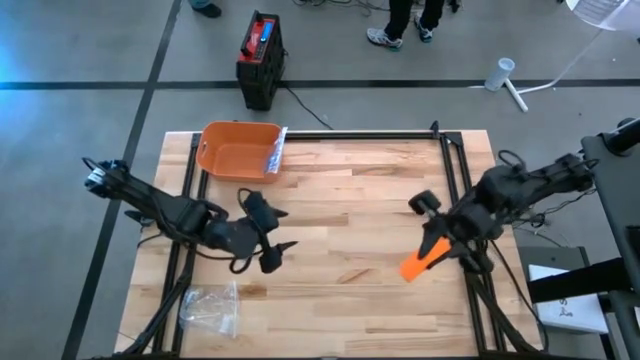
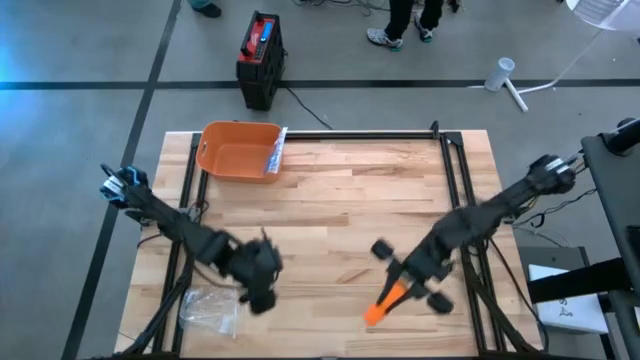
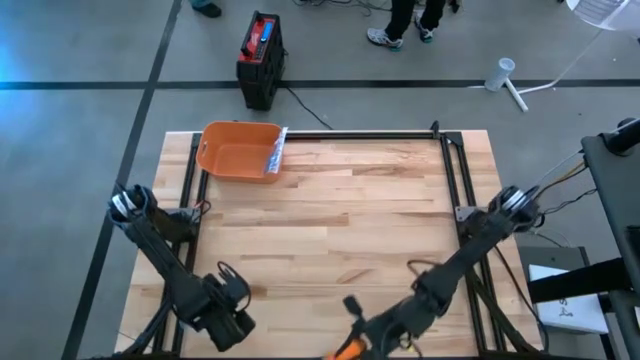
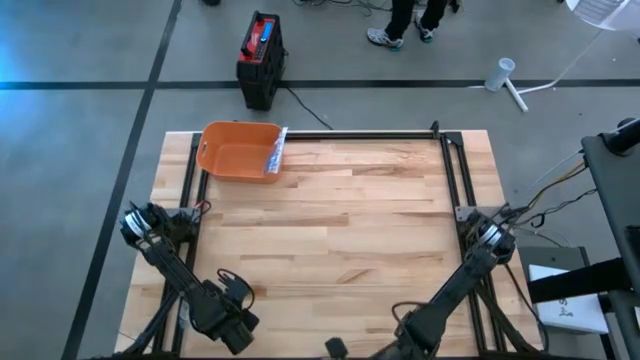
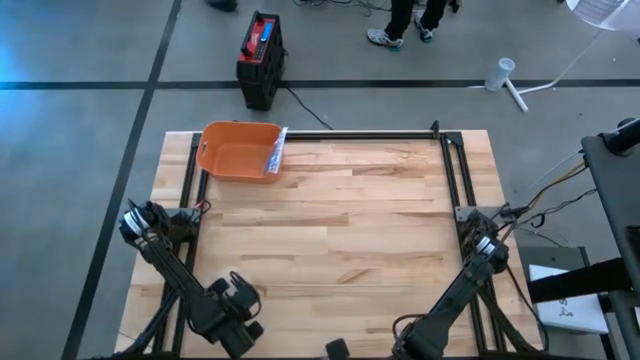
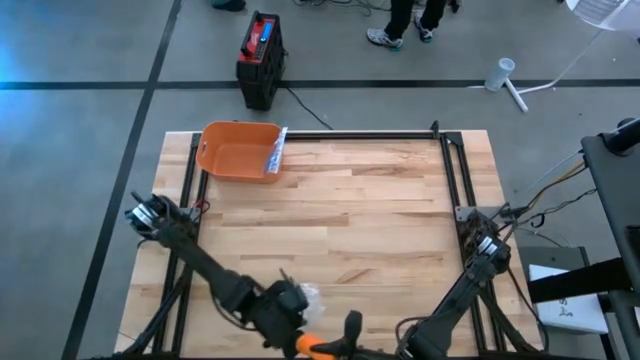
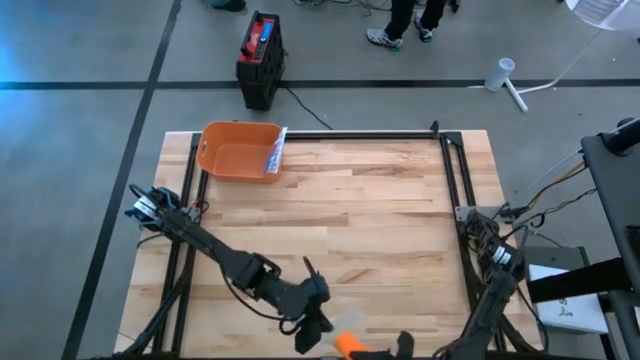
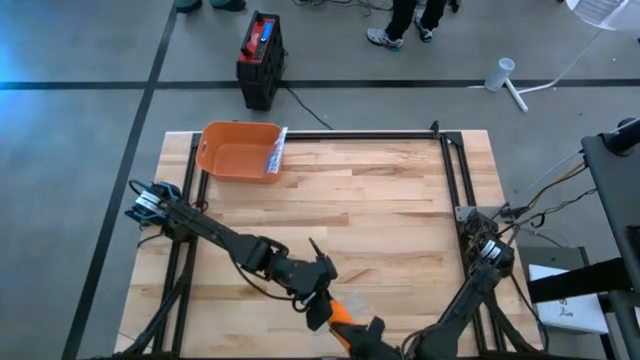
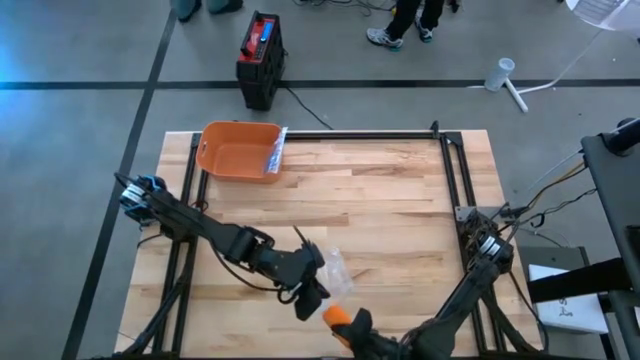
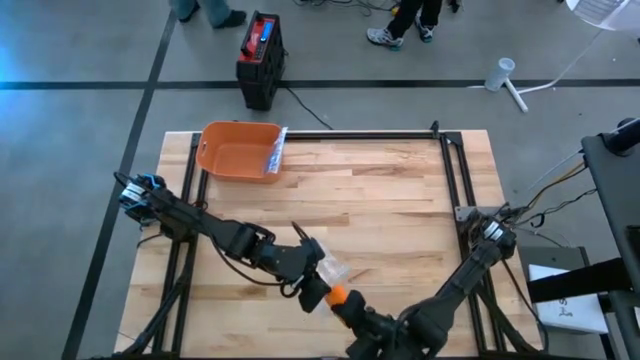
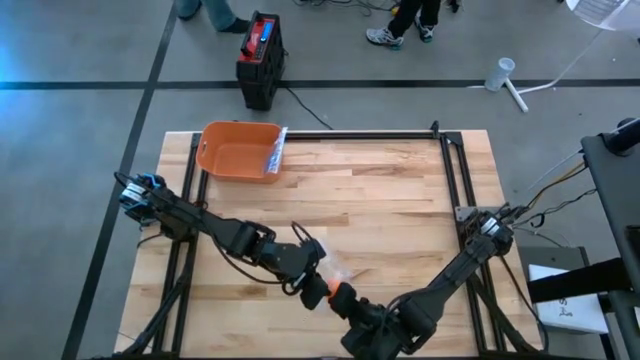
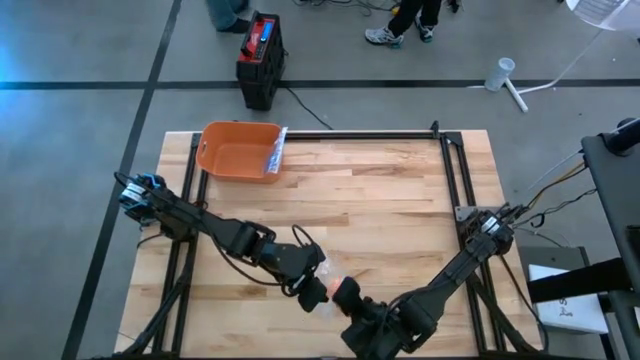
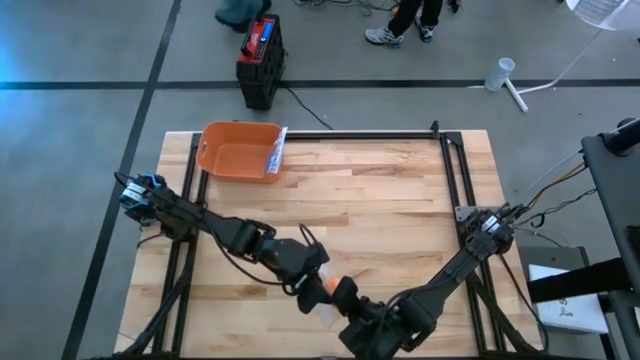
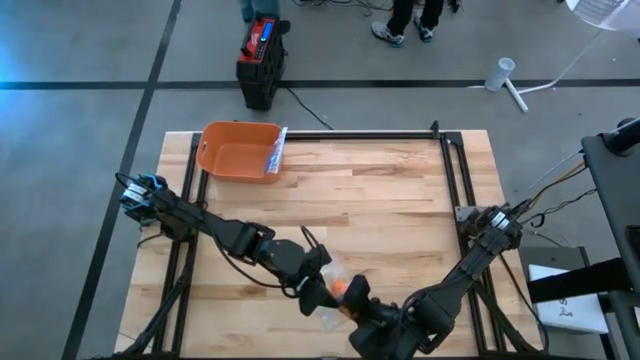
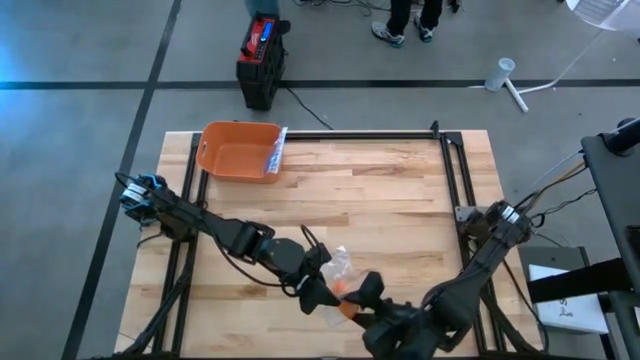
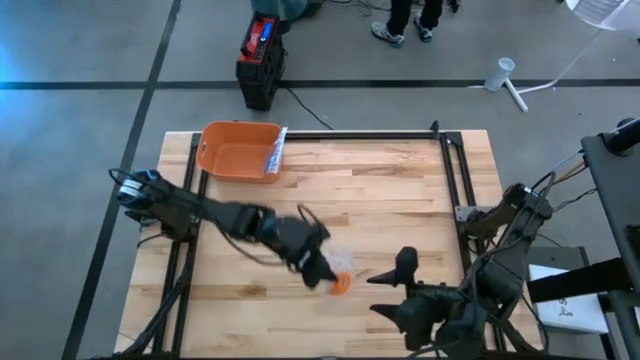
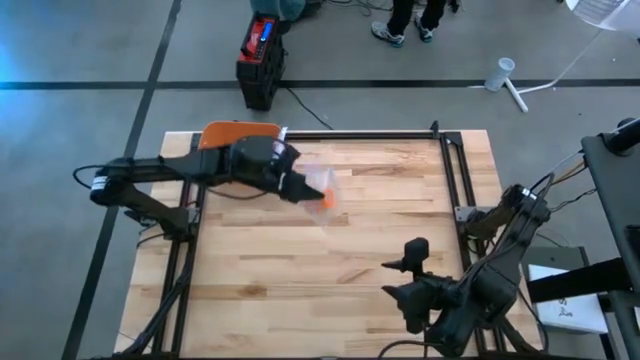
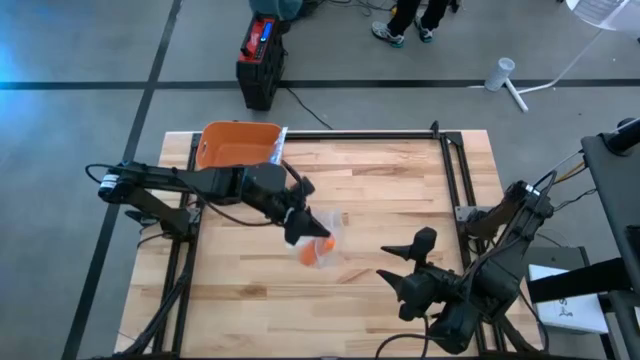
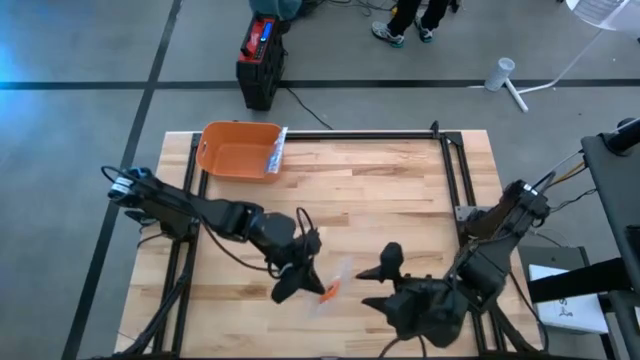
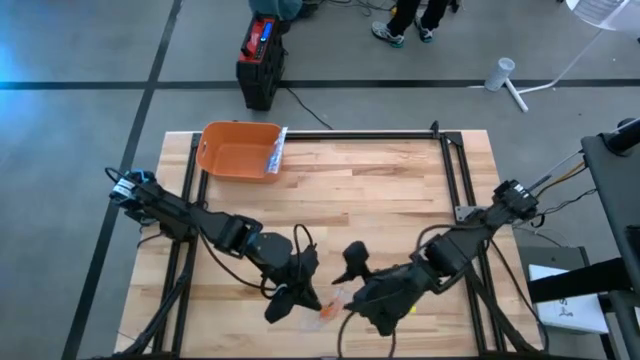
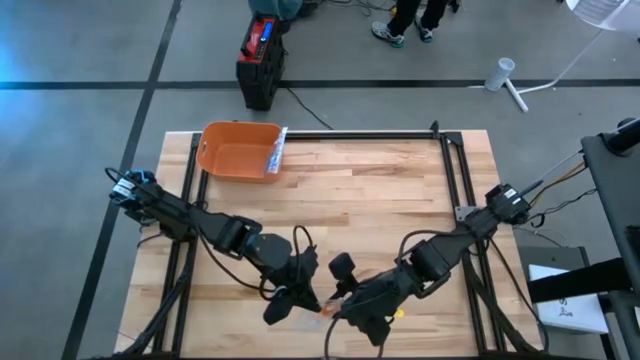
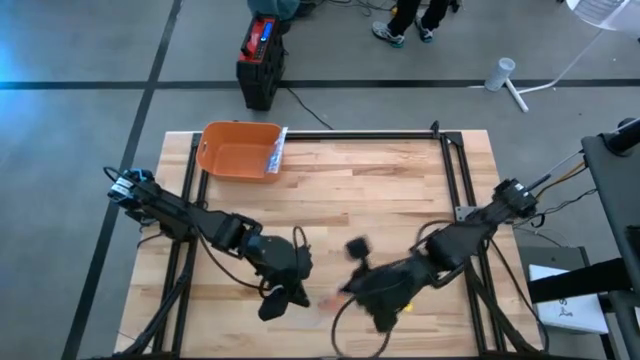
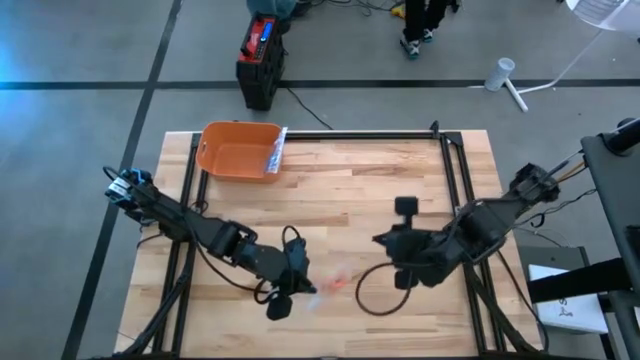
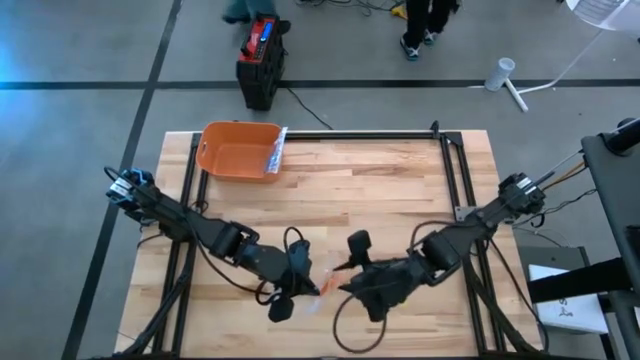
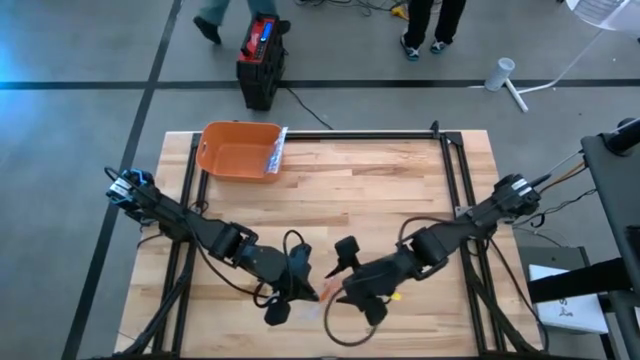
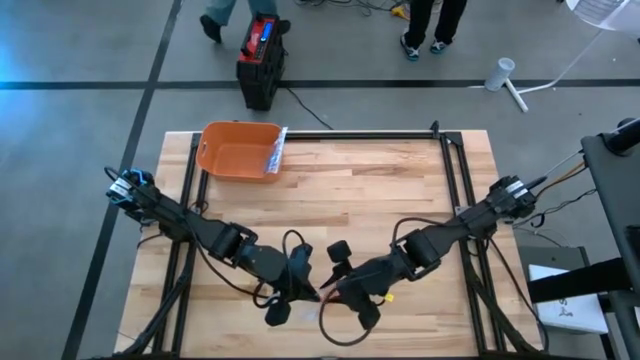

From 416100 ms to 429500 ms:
Task: Roll bandage
Put the rolled orange bandage into the transparent zip bag

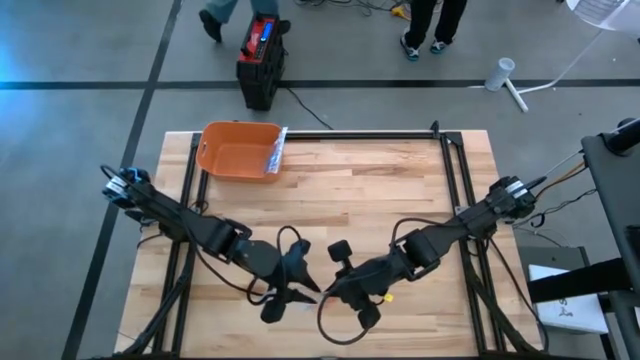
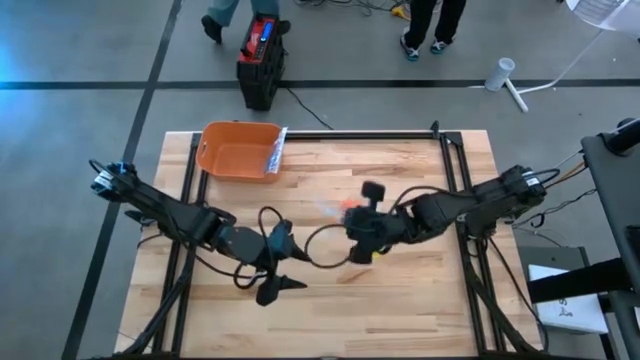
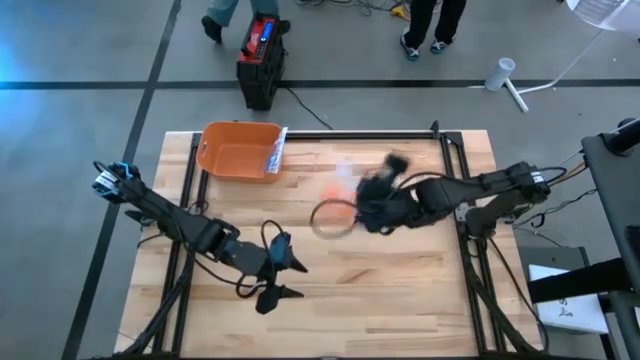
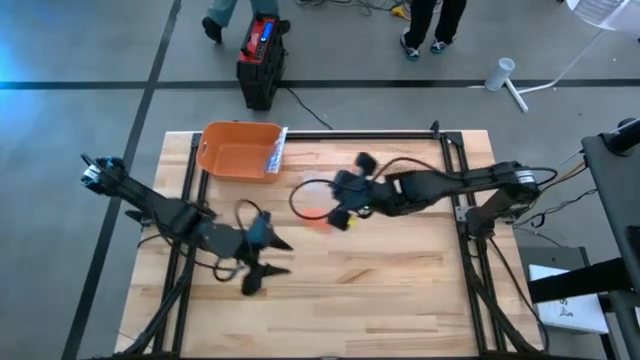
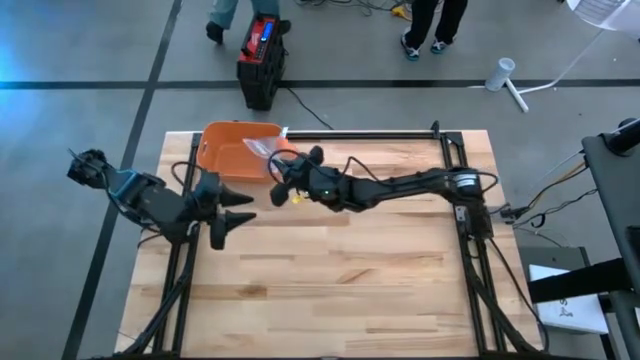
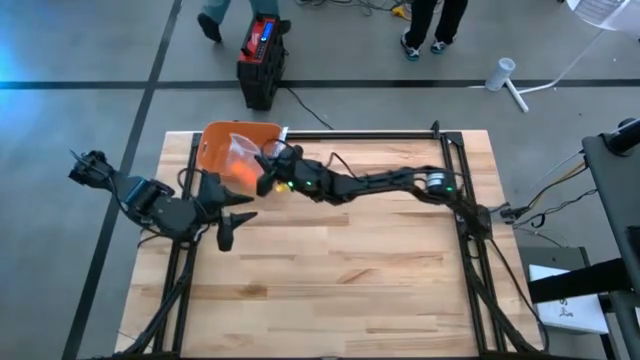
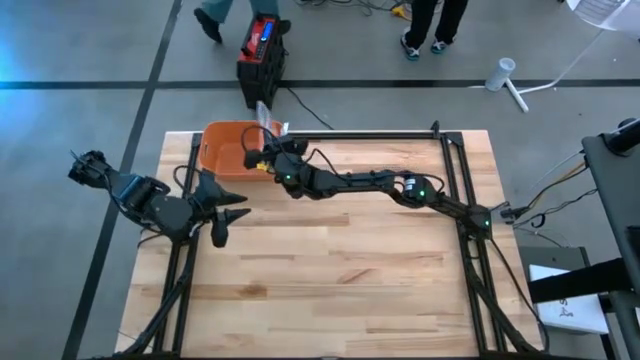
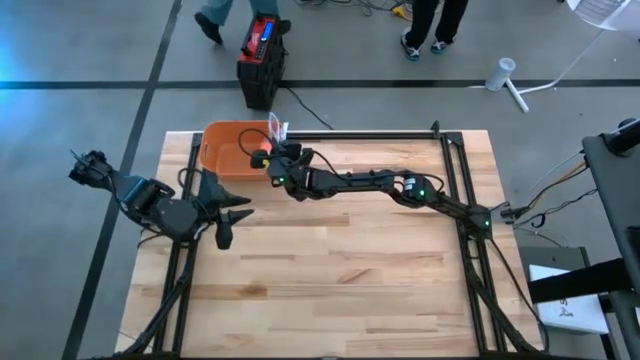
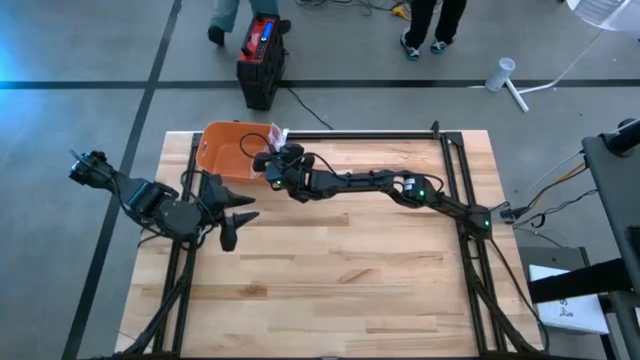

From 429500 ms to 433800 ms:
Put the transparent zip bag containing the rolled orange bandage into the orange bin

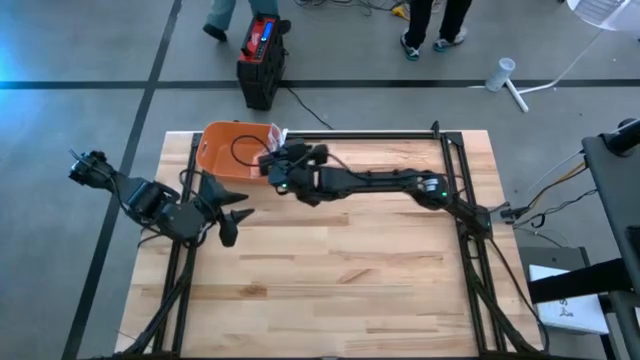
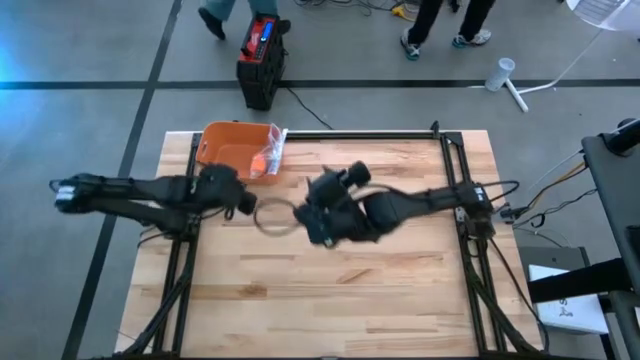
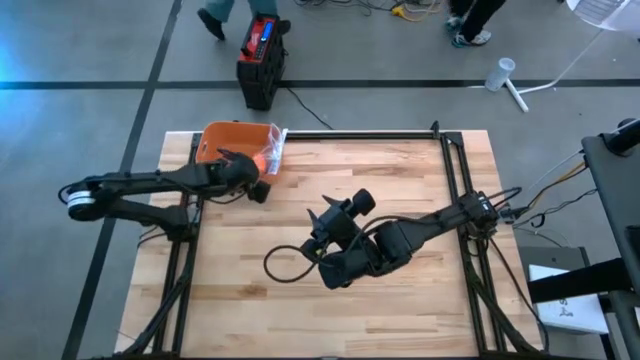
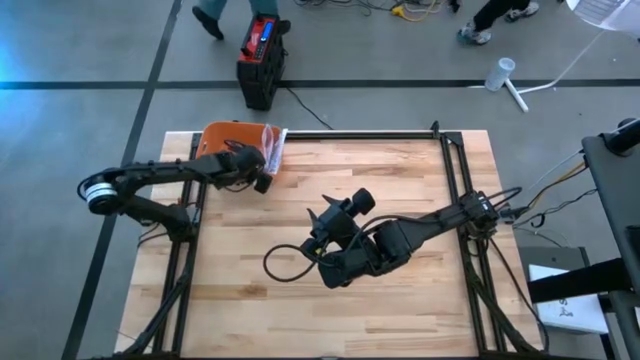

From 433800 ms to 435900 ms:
Adjust the orange bin on the table

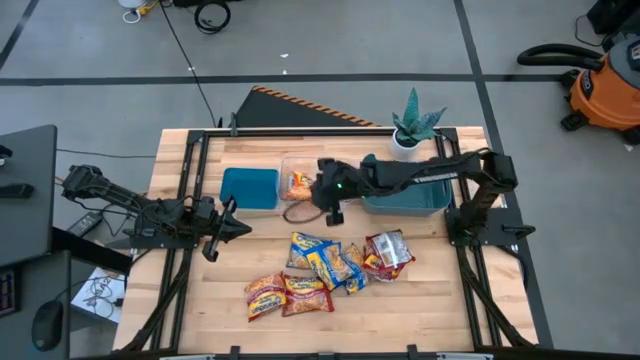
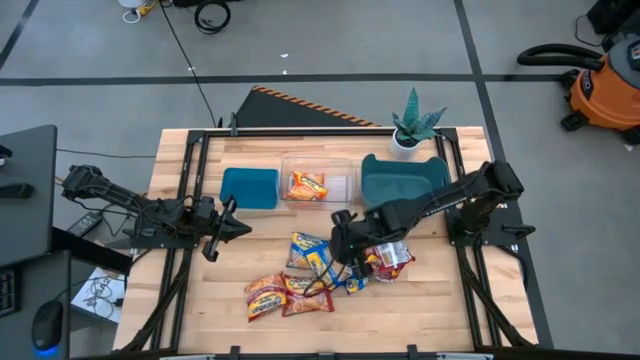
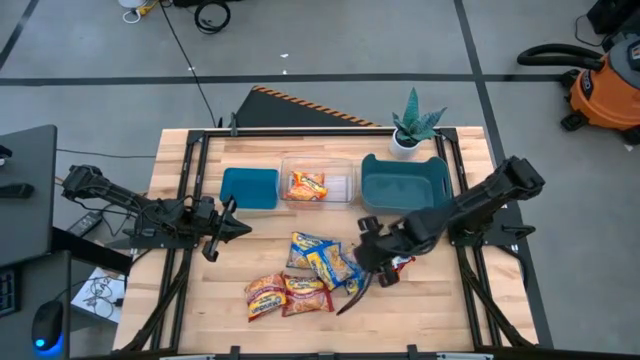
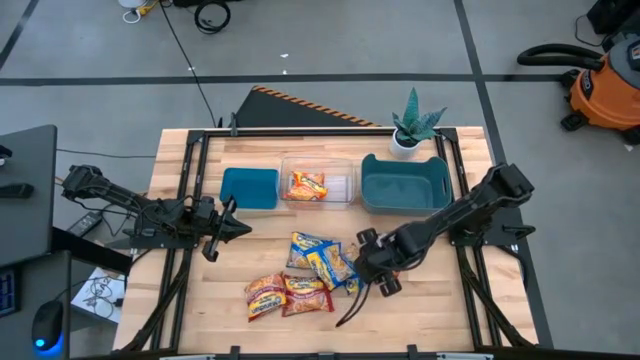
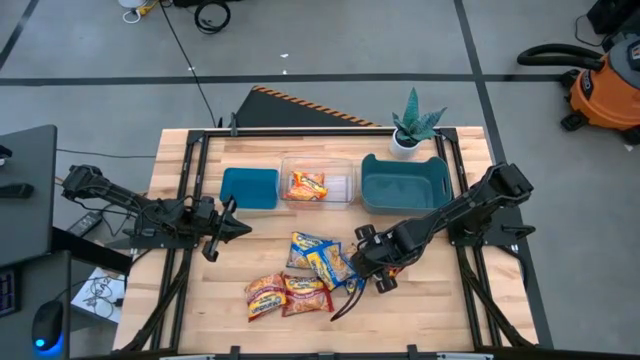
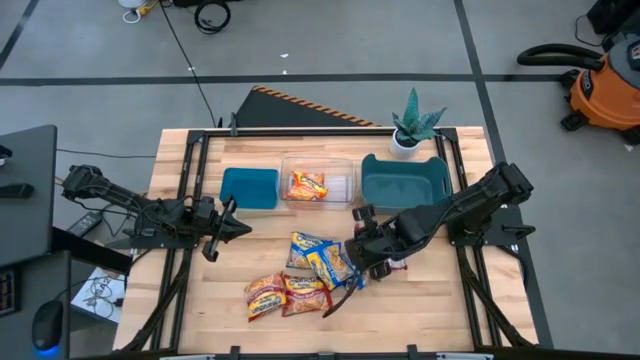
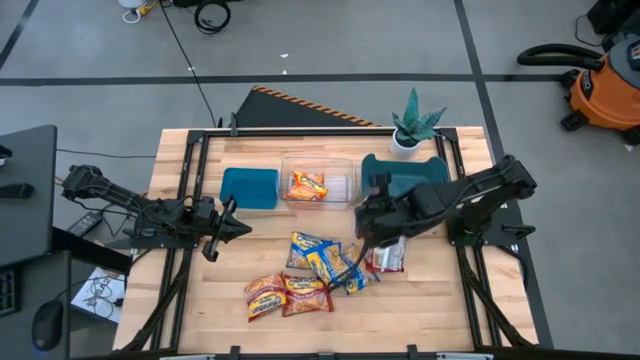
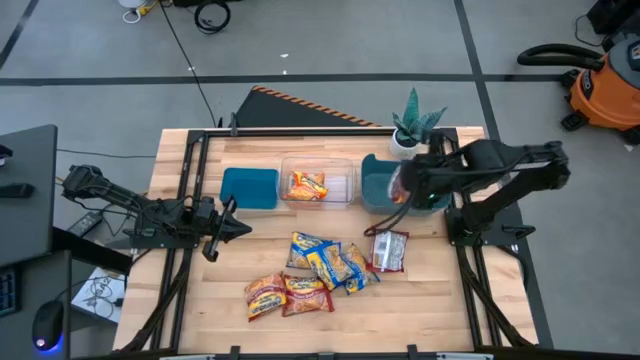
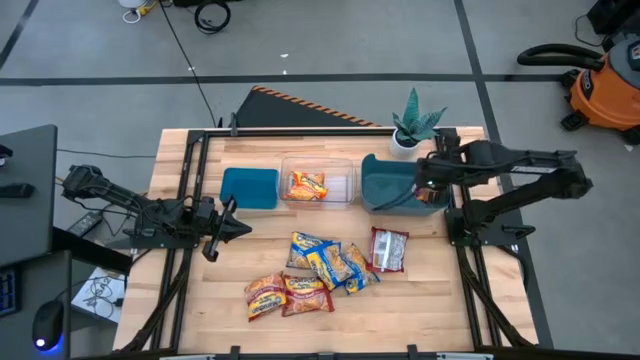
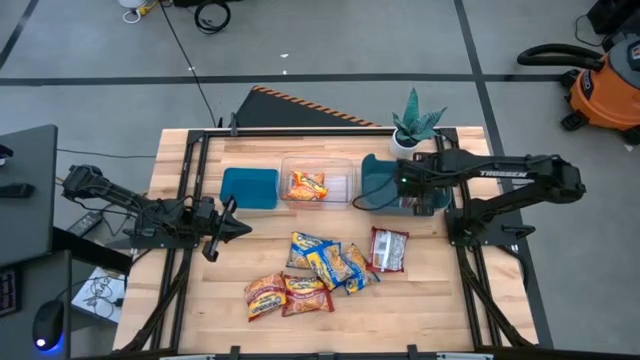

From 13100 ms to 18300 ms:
Task: Sort Maruchan noodles
Put the red noodle pack into the green bin
